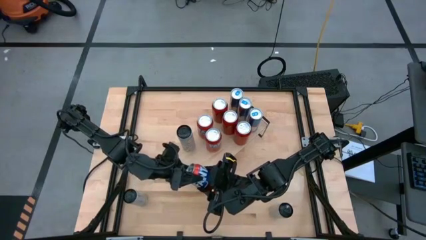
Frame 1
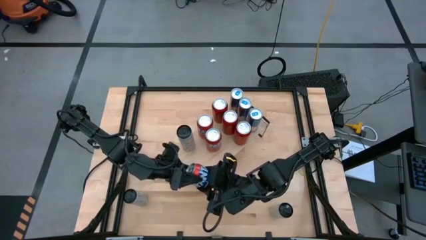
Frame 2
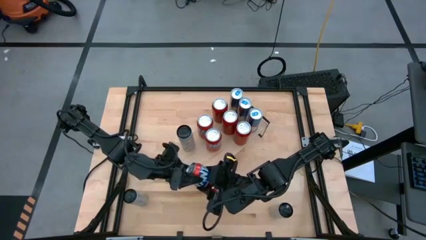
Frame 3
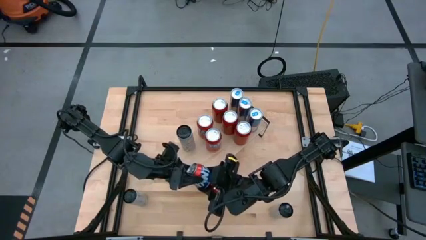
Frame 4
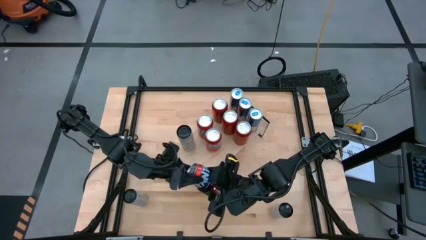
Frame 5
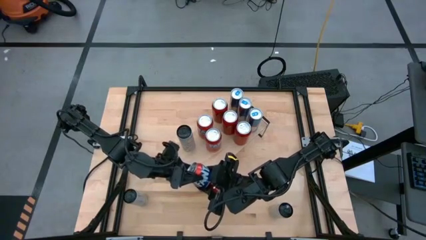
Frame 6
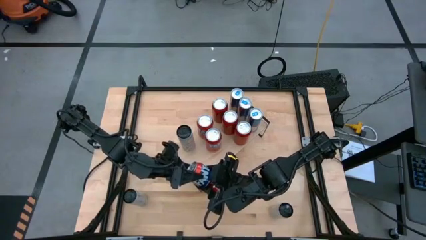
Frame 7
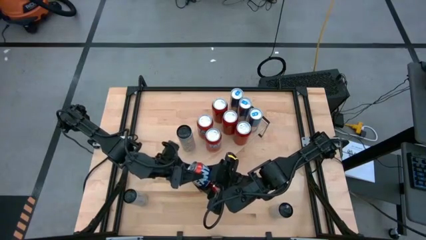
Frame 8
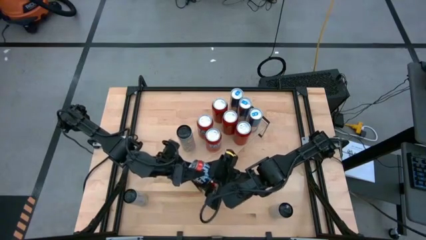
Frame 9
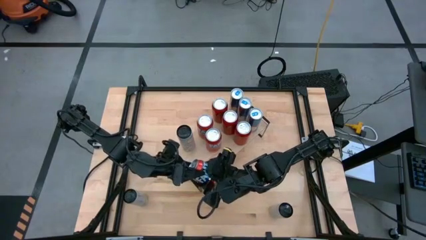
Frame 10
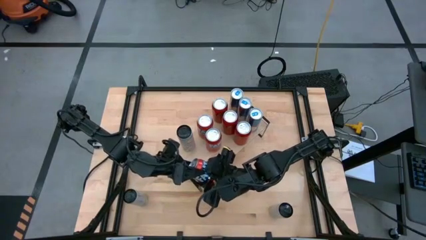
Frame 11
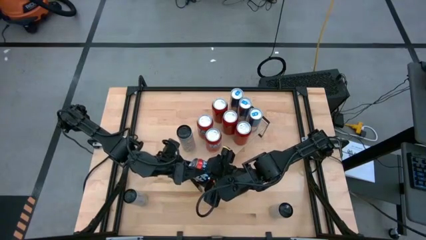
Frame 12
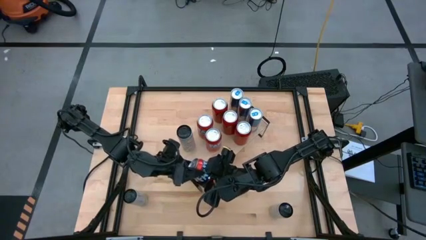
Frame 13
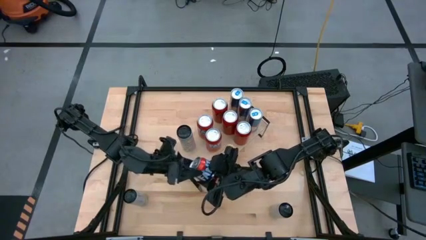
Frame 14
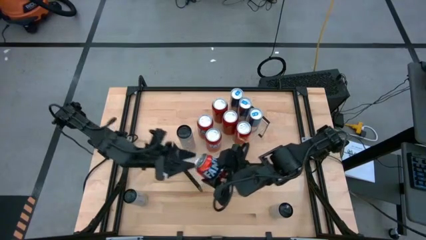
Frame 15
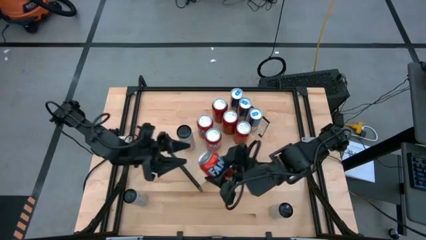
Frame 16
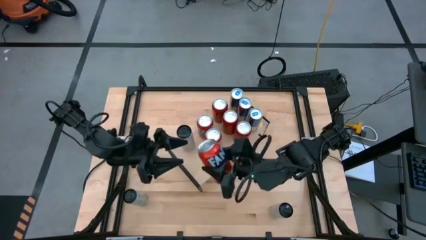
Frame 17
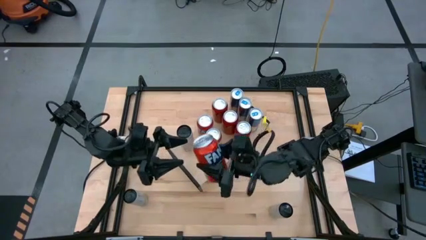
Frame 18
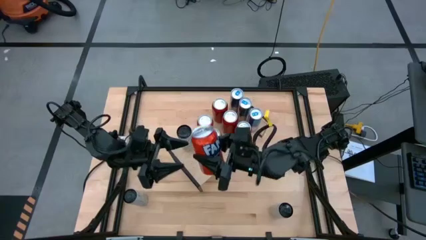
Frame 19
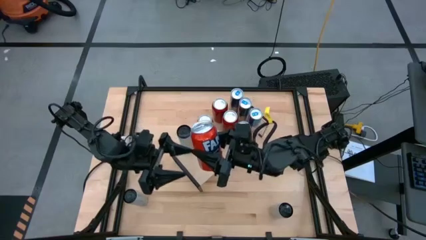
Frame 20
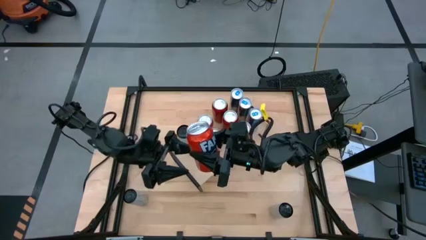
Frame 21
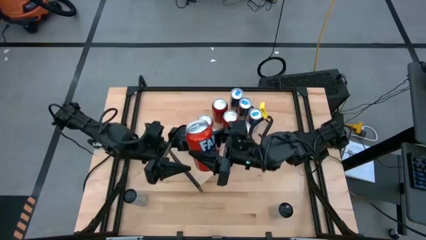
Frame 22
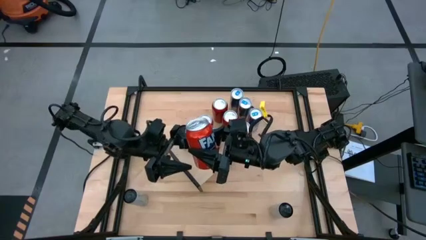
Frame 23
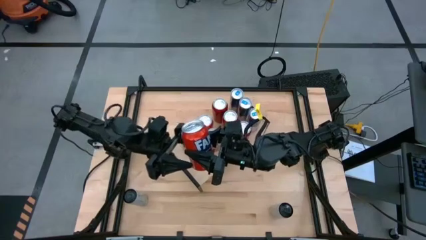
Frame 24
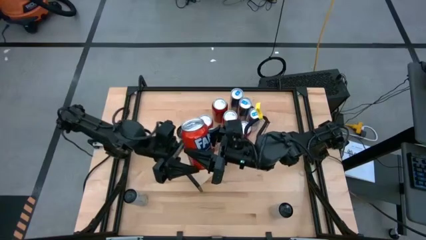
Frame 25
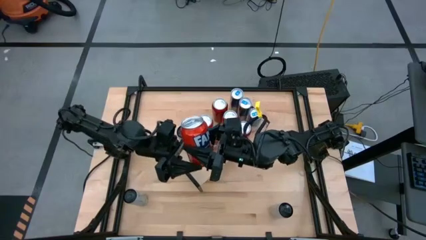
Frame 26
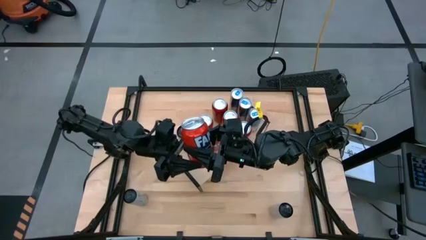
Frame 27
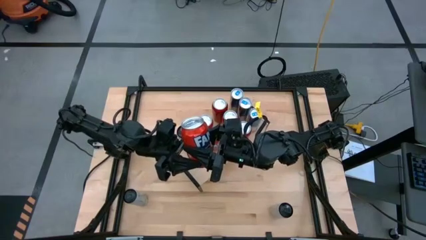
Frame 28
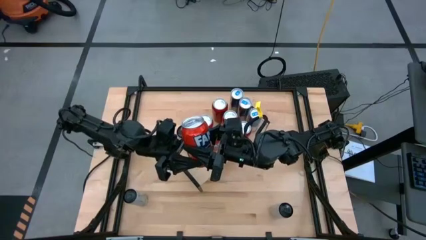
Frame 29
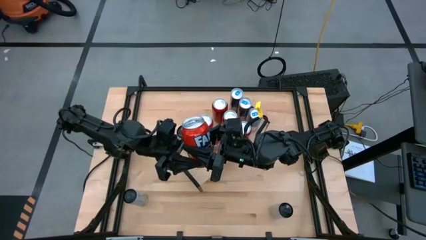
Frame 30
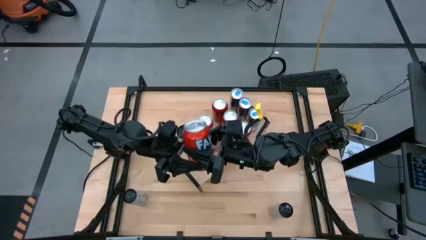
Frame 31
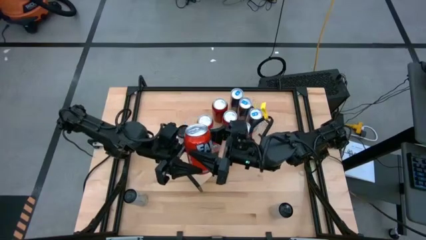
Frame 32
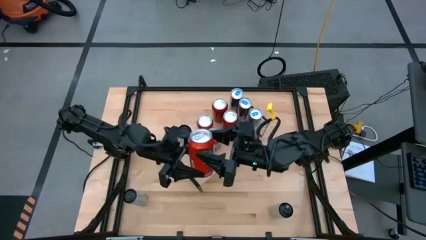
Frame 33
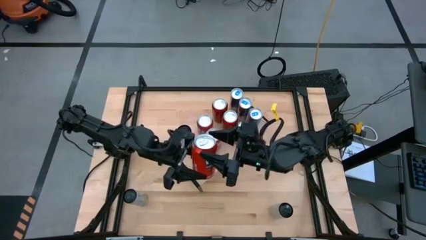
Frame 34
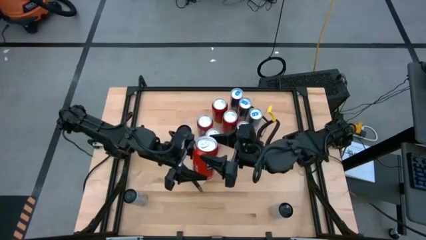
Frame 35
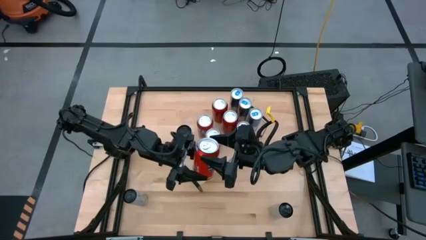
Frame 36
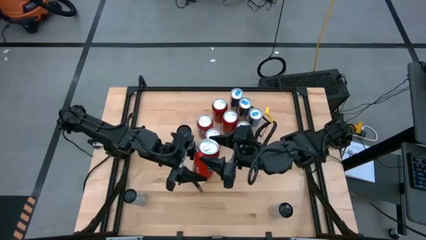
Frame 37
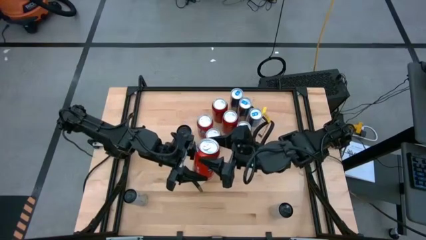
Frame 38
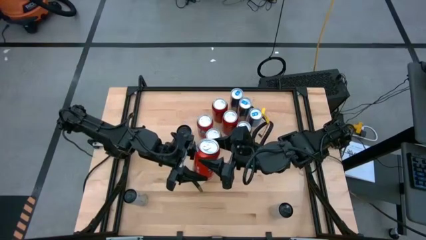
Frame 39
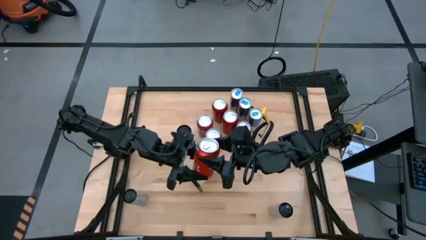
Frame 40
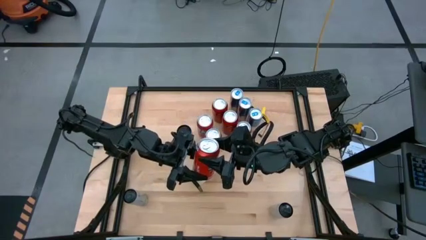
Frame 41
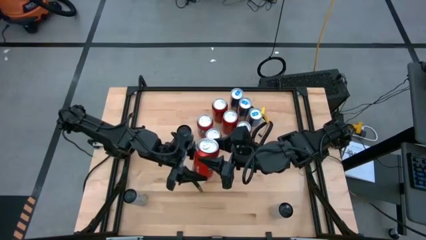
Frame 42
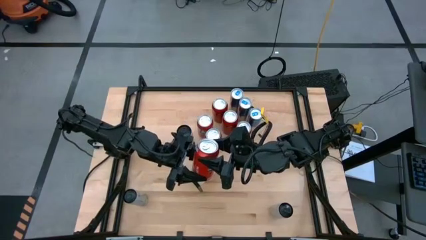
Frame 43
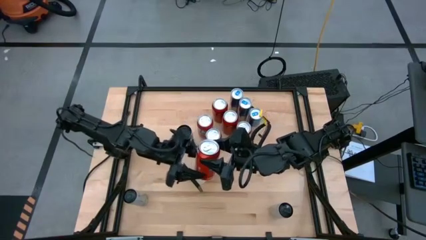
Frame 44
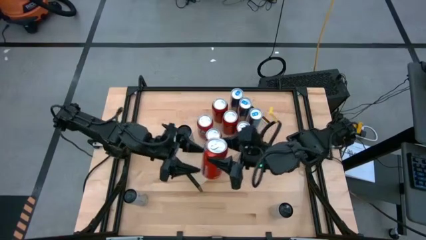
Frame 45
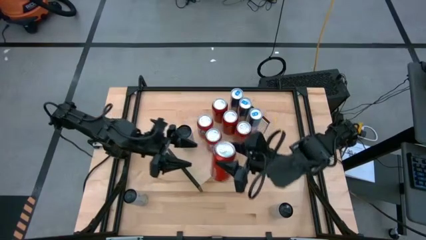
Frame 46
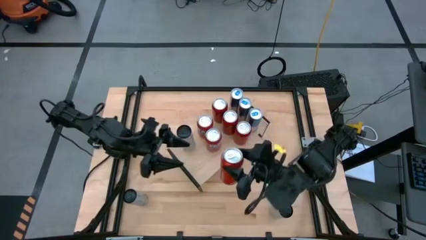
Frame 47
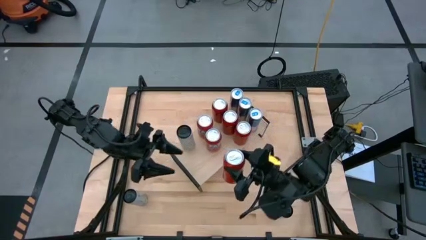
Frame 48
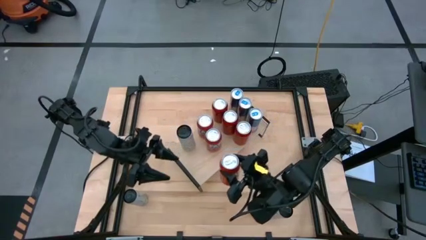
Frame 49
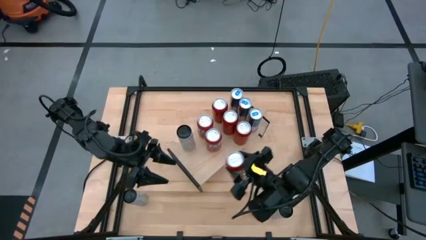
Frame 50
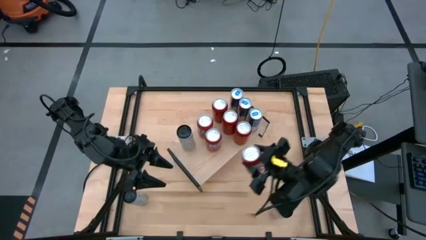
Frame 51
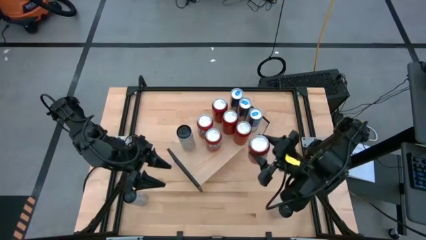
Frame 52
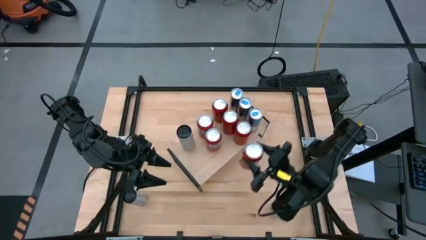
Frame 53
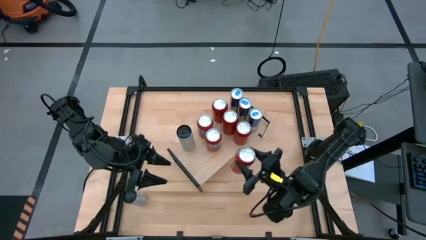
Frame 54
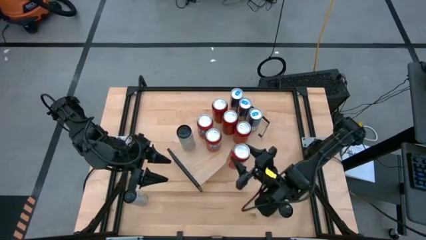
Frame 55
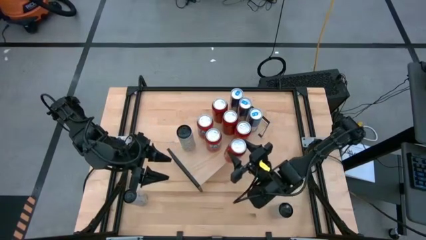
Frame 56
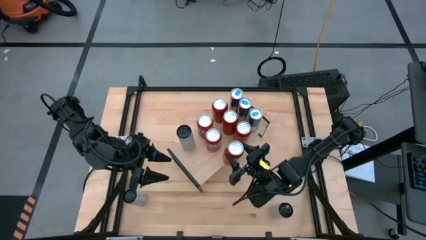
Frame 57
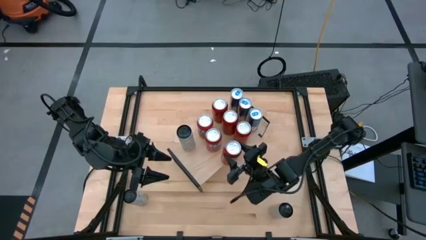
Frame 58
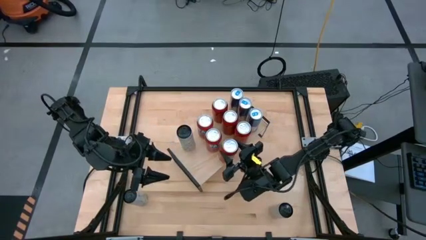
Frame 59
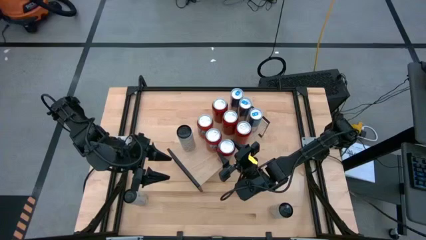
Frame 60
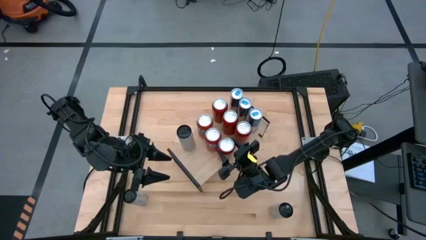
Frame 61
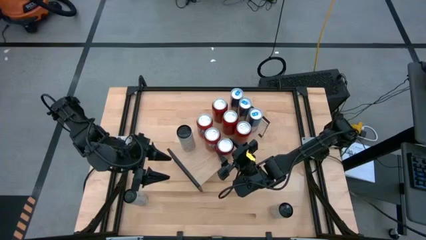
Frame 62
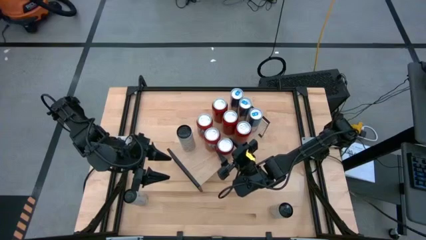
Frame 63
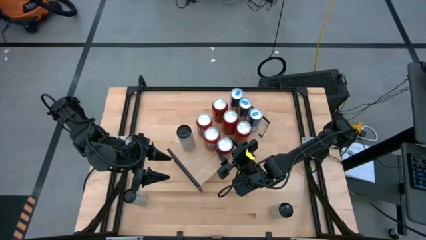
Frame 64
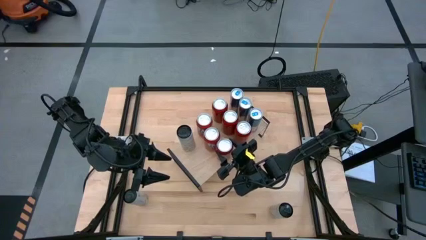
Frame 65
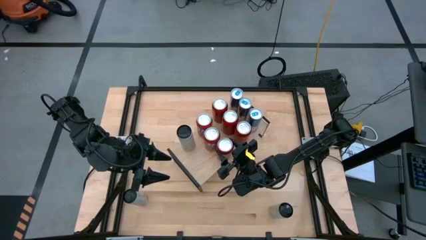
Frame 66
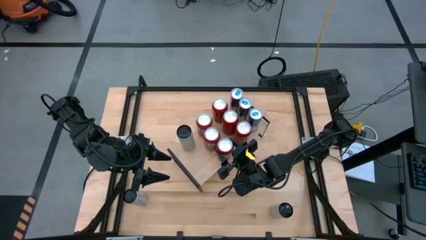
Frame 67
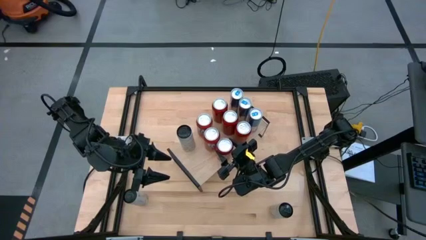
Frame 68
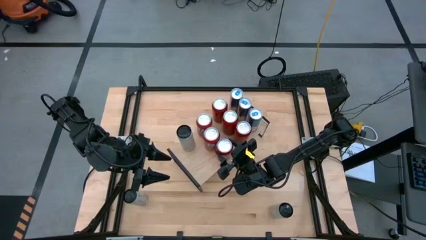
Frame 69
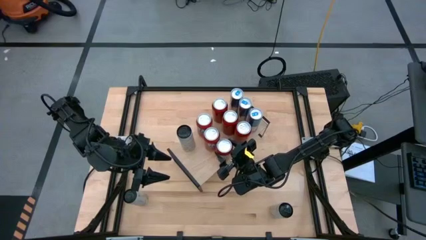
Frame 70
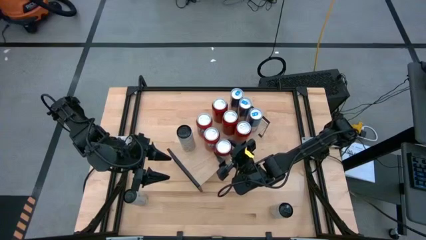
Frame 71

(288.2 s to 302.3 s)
Task: Place canned beverage on shelf
Put the orange soda can on the shelf

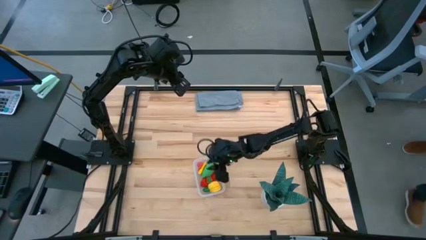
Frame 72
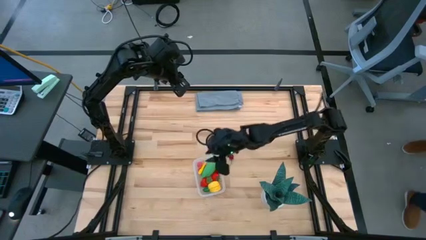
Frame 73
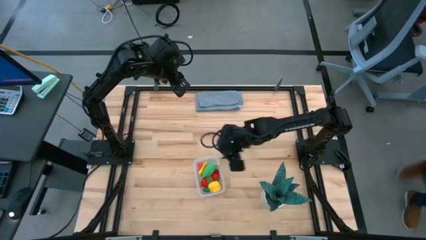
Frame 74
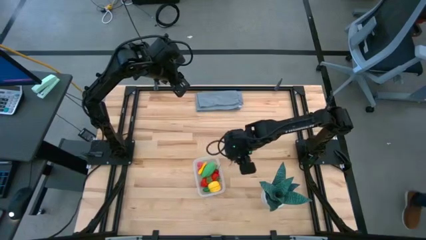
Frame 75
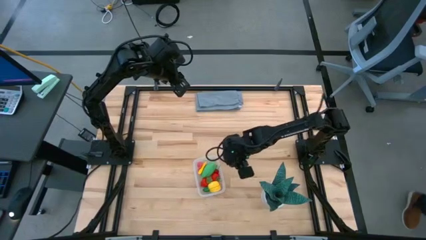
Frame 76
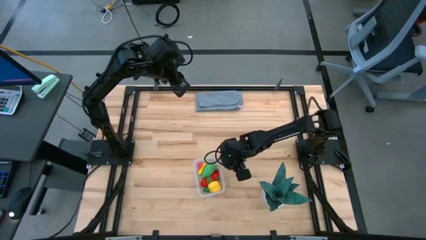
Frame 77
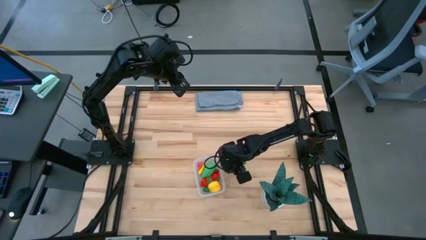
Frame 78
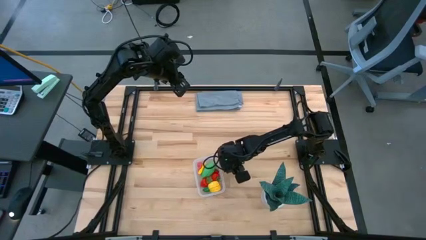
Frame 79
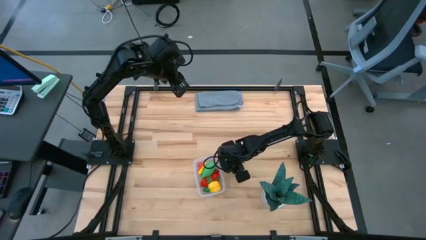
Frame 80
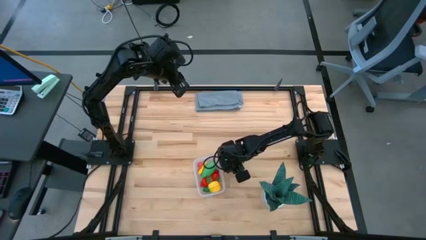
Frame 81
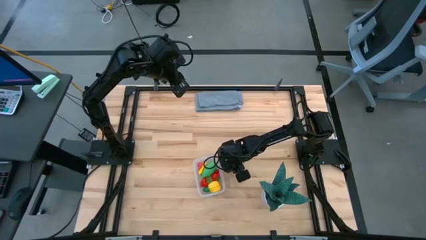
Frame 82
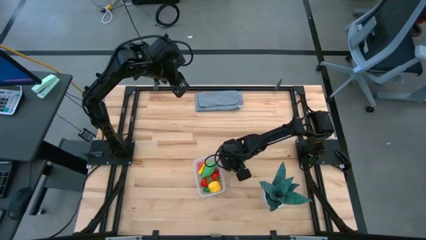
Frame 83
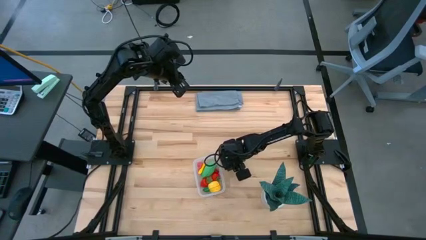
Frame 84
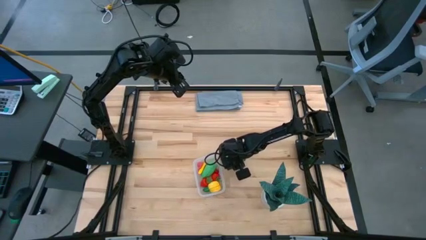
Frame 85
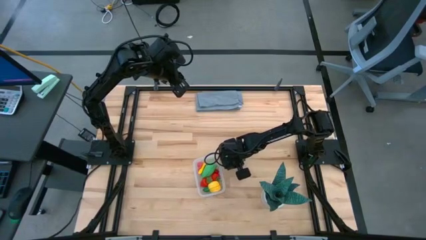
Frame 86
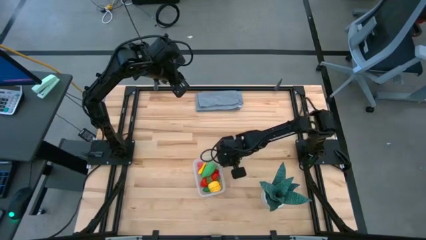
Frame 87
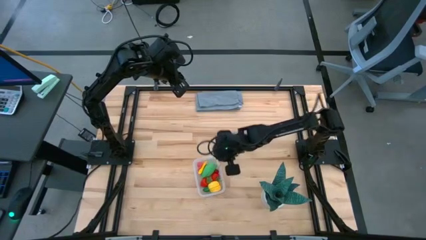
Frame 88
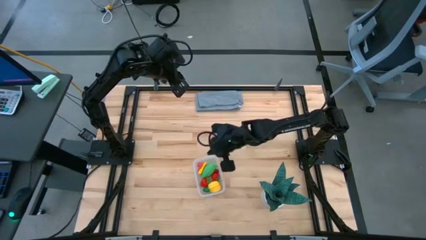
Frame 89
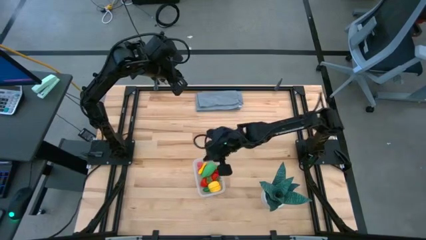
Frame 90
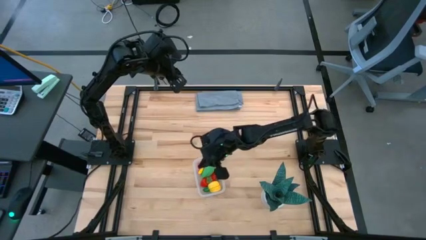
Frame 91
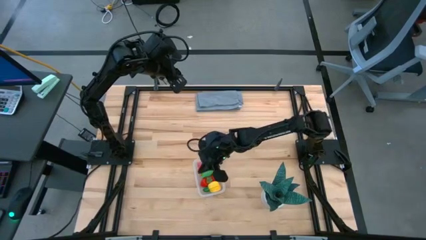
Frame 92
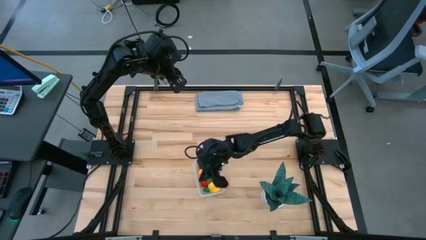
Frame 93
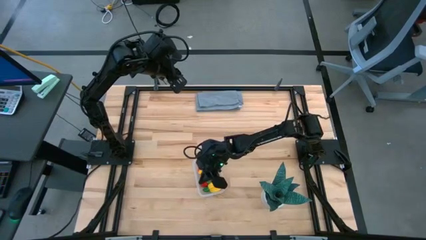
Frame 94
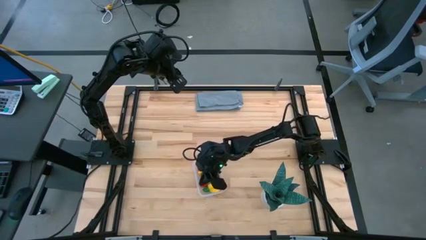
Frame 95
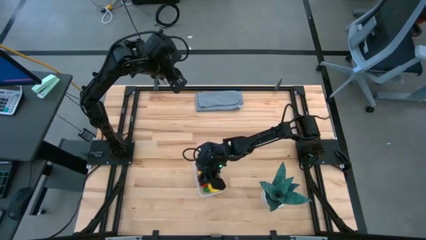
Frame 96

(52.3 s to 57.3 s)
Task: Pick and placing Produce into tupperware
Put the cherry into the transparent bin
